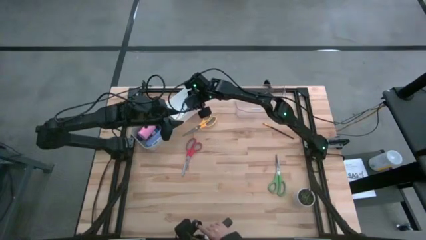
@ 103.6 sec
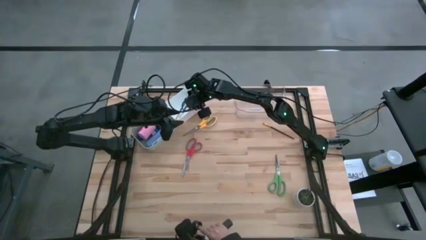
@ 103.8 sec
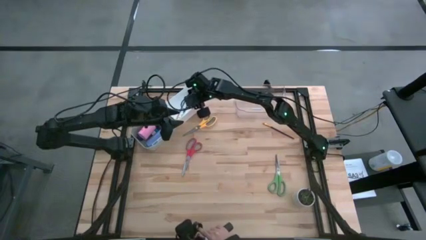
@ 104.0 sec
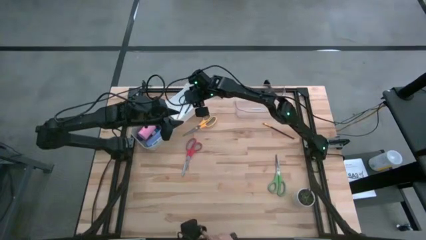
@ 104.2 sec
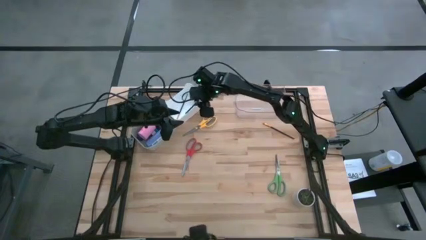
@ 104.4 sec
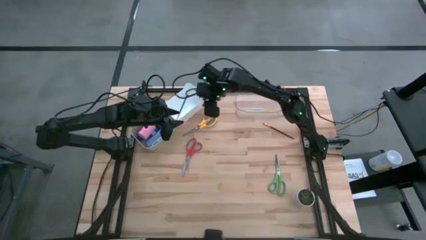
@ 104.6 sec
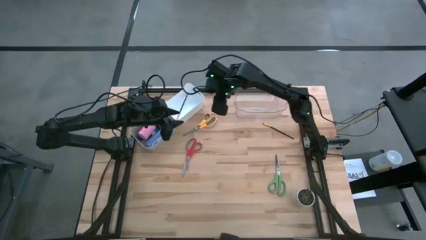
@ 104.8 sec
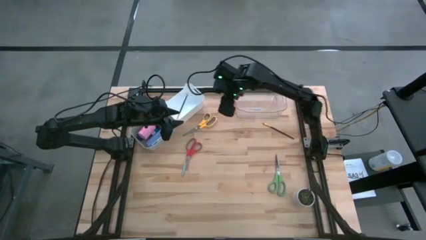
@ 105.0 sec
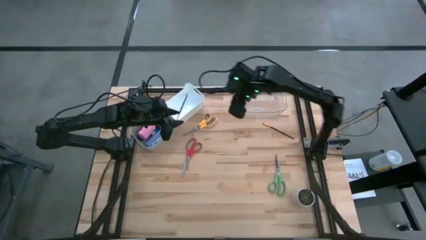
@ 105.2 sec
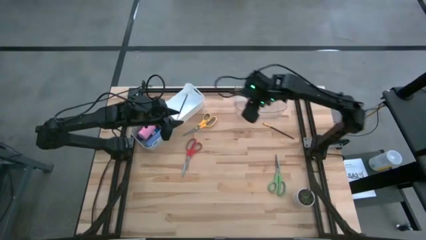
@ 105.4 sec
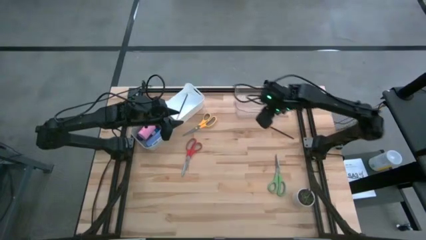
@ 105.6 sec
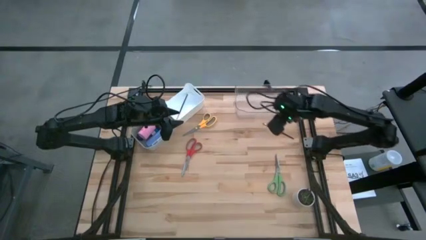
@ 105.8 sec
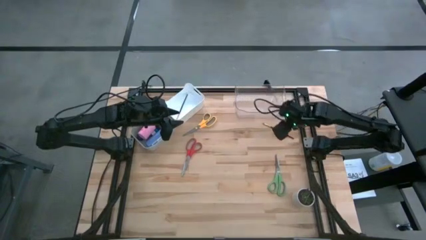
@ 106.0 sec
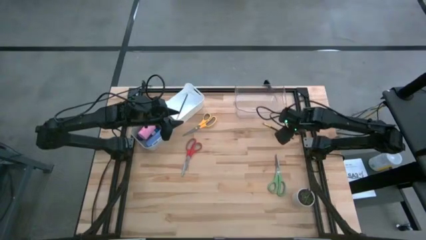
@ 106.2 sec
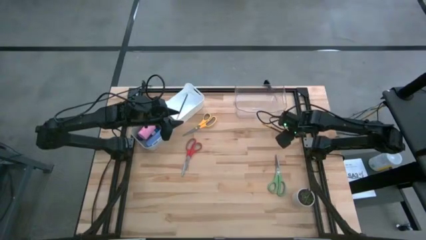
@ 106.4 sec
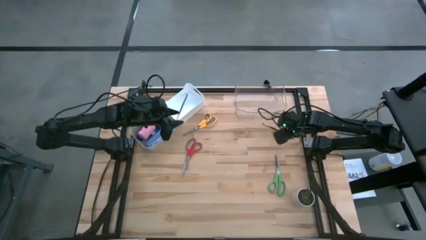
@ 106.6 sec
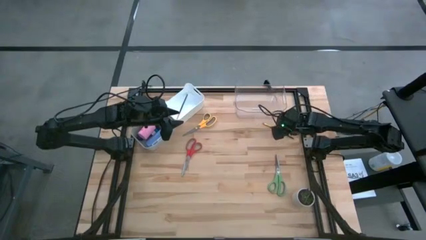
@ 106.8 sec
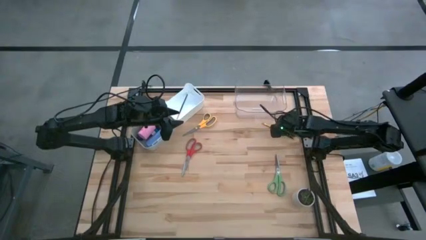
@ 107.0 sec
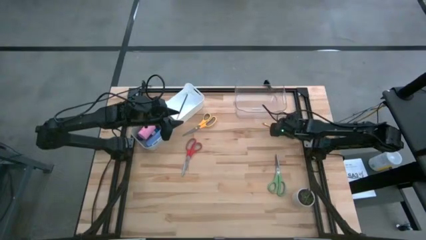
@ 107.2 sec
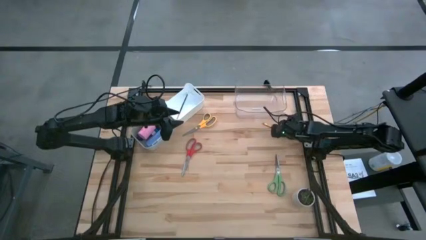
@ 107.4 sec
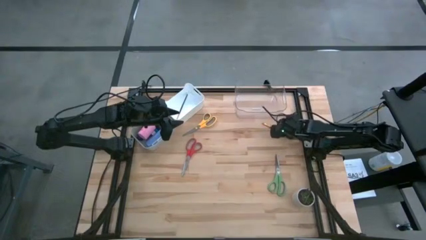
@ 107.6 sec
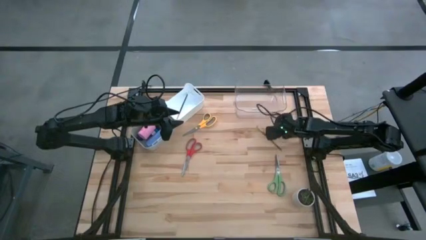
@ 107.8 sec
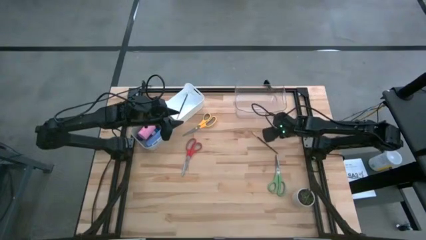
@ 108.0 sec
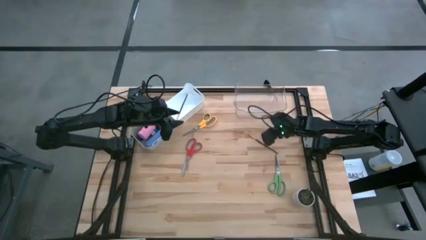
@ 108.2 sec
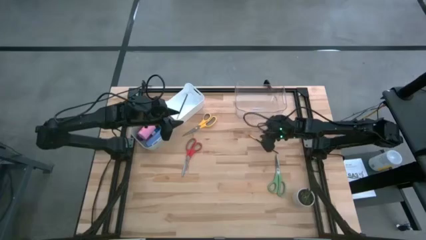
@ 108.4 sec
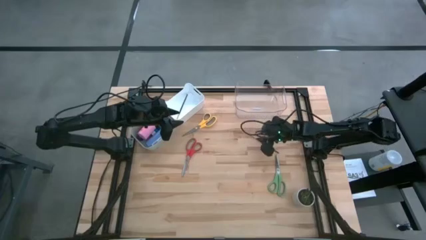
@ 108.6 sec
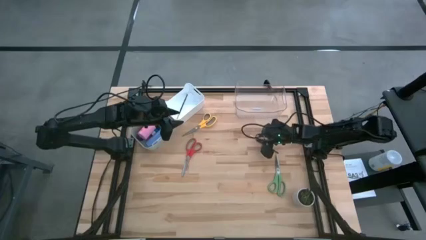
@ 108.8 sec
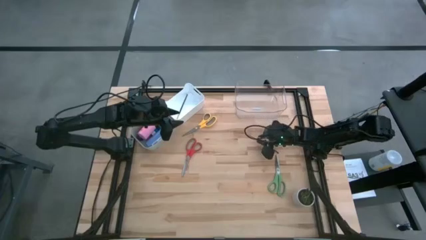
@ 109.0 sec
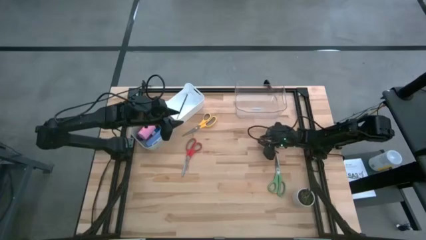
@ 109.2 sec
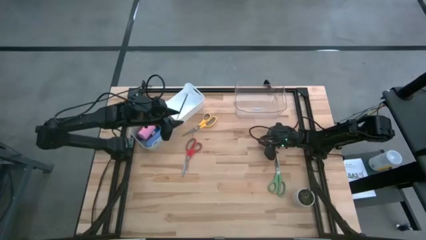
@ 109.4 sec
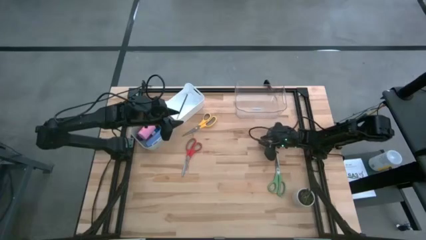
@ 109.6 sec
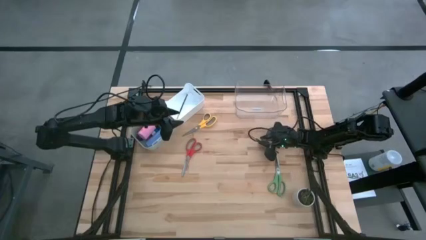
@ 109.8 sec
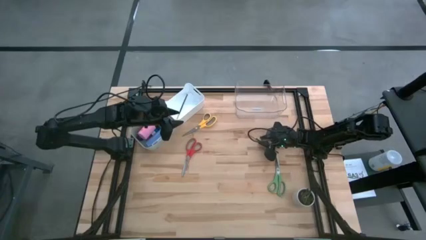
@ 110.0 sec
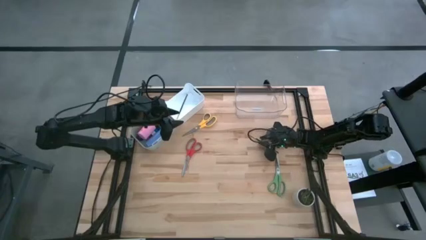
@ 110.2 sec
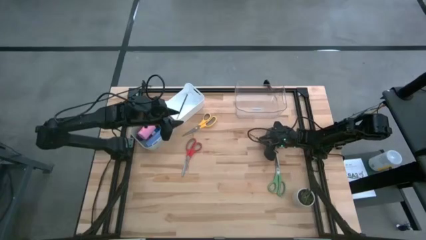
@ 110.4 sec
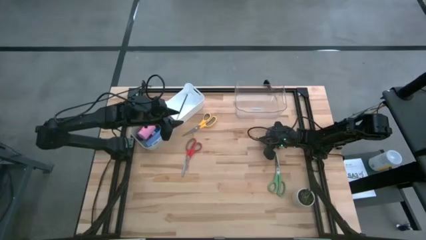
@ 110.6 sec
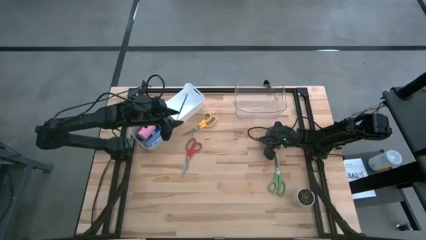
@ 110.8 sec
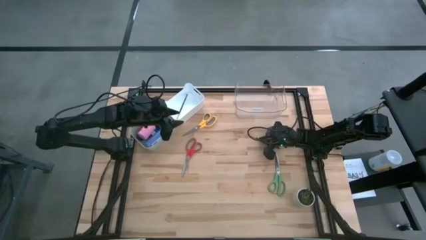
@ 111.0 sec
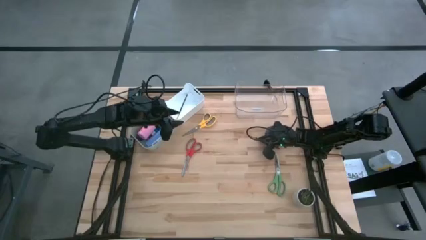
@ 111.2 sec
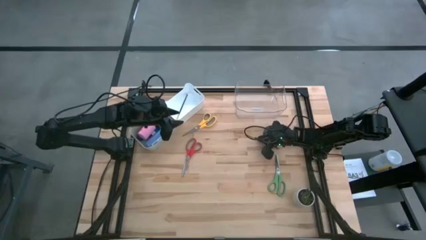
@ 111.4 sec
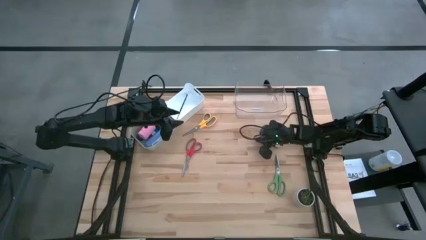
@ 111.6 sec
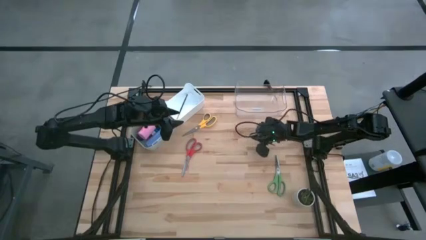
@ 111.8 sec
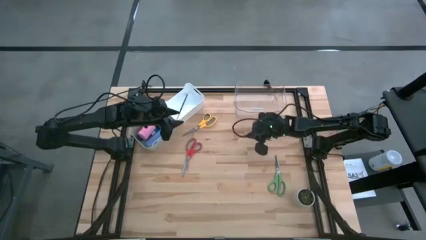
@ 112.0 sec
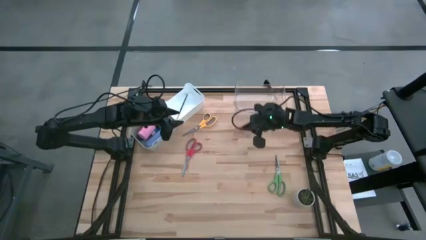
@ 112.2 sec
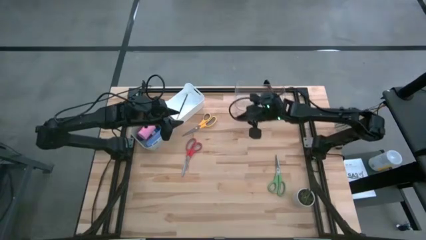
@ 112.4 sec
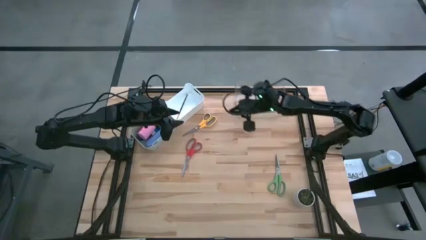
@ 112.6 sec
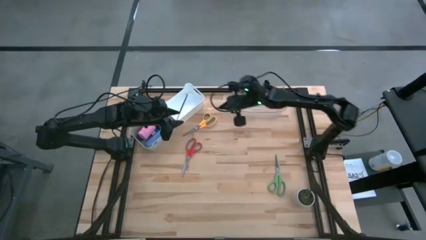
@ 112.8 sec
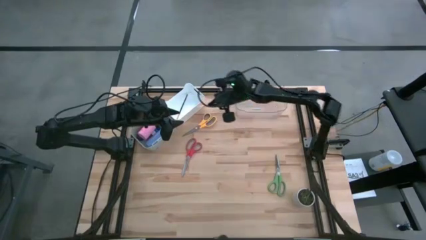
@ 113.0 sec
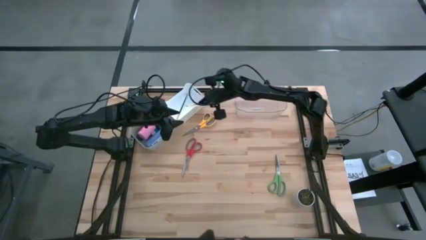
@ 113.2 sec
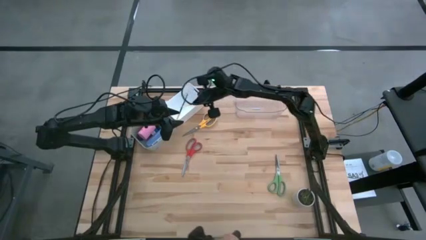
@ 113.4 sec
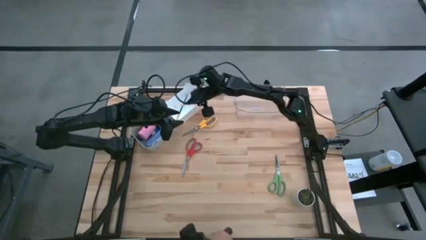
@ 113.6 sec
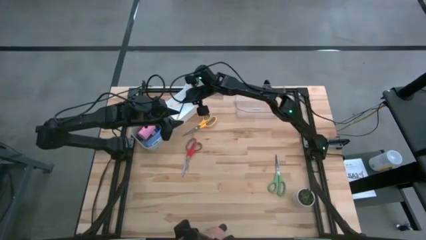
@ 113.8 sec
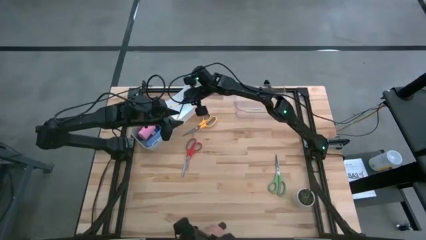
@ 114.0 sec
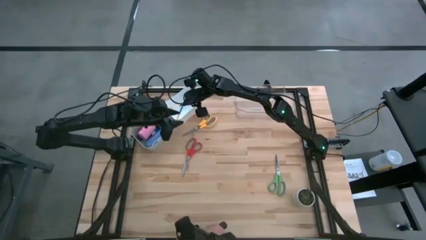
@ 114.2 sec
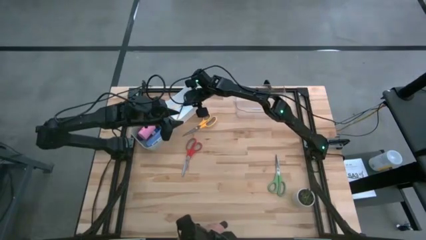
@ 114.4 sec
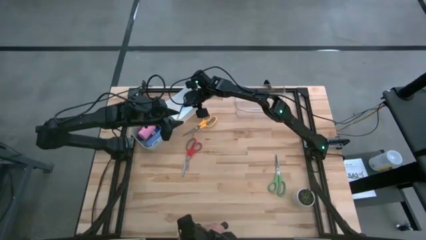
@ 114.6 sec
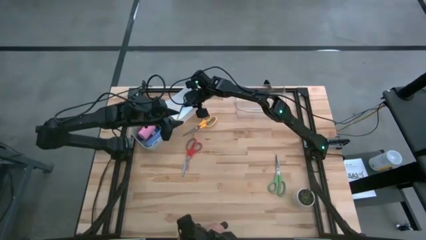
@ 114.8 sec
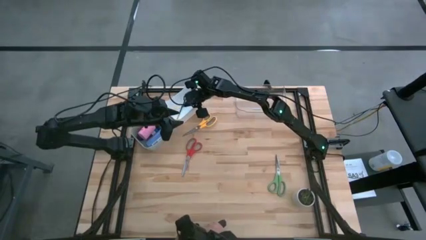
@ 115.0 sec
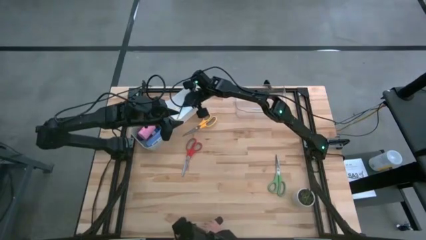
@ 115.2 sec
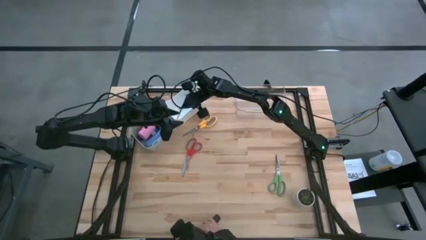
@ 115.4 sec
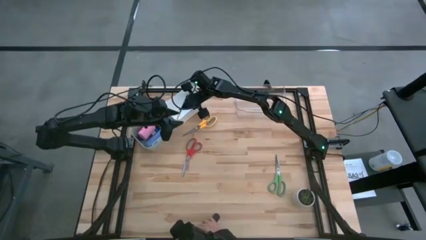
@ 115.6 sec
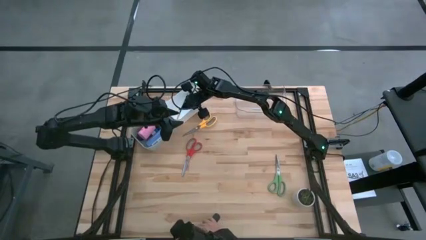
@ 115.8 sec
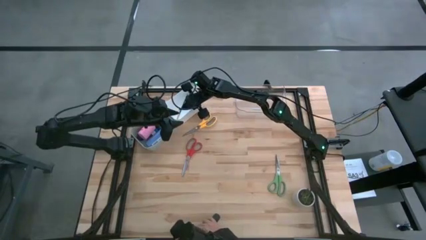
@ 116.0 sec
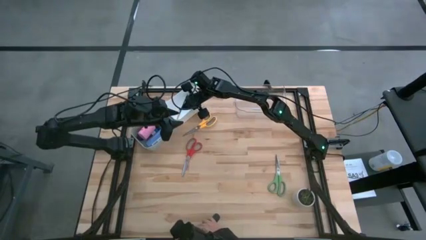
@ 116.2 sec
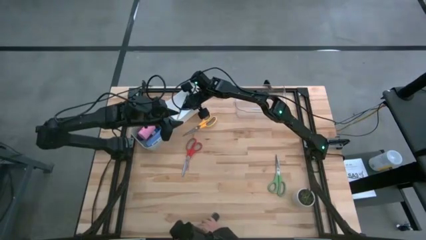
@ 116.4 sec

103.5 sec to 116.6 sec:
Task: Pick & Place Paint Supplies
Put the gold paint brush into the white bin

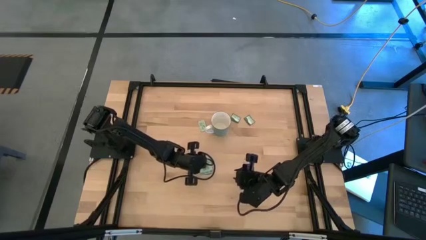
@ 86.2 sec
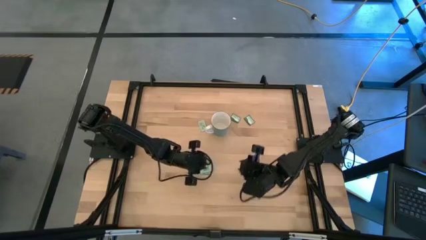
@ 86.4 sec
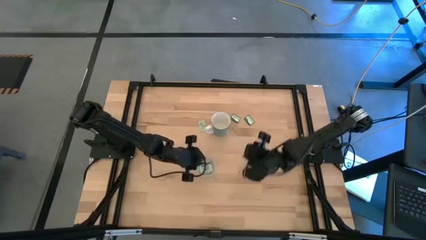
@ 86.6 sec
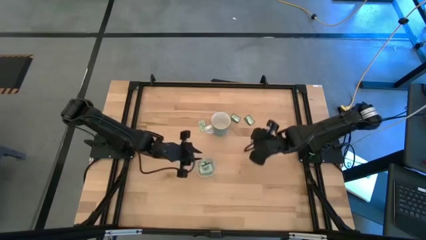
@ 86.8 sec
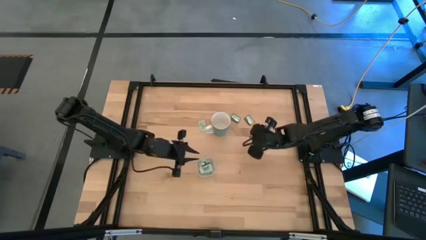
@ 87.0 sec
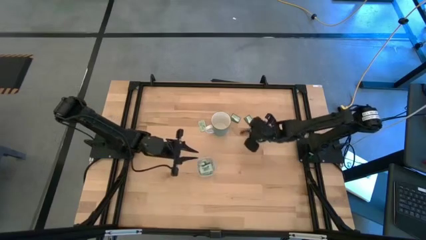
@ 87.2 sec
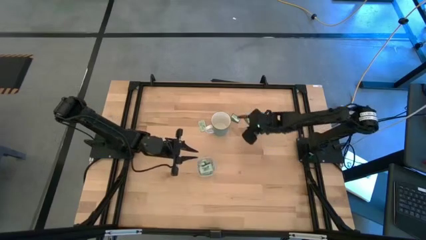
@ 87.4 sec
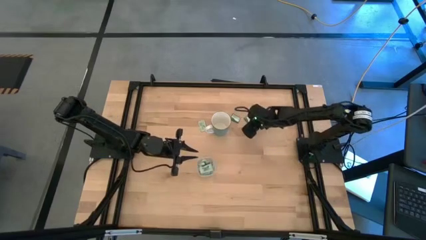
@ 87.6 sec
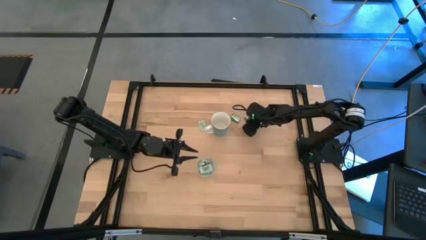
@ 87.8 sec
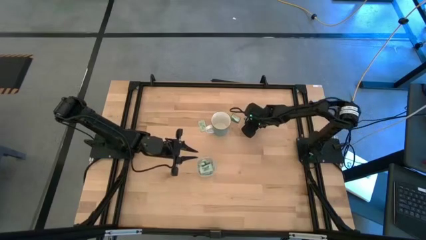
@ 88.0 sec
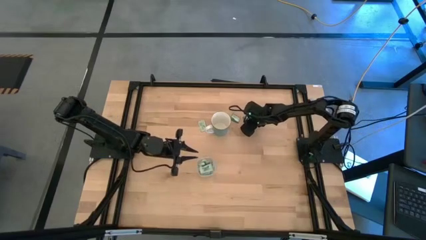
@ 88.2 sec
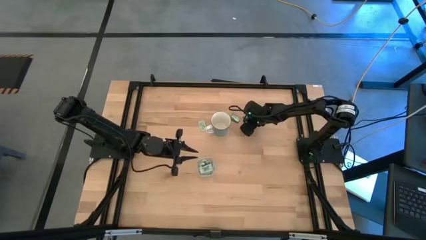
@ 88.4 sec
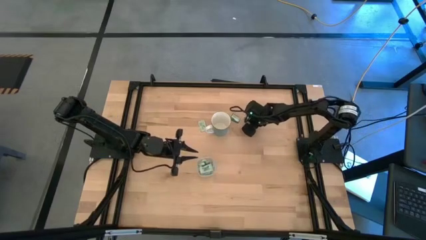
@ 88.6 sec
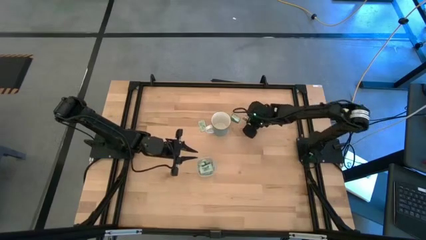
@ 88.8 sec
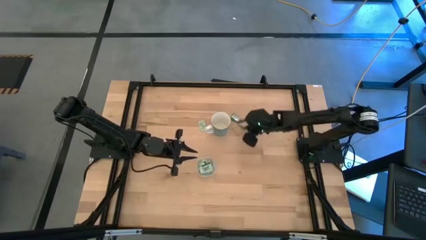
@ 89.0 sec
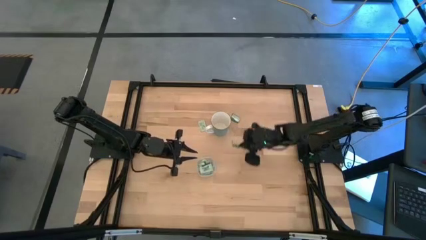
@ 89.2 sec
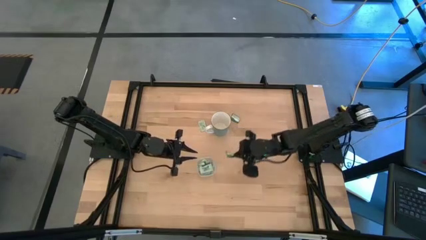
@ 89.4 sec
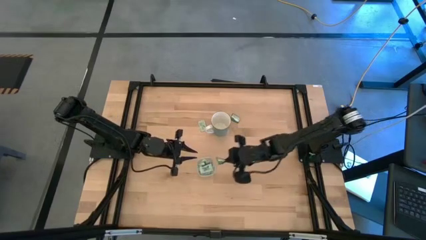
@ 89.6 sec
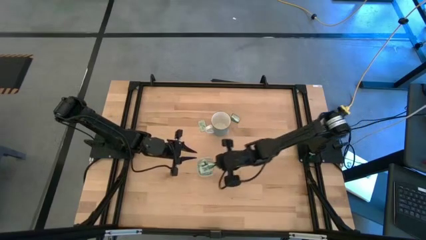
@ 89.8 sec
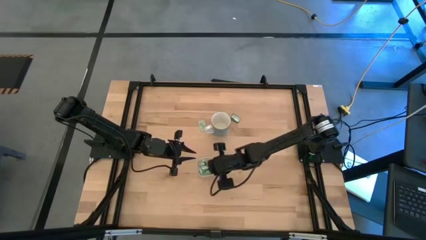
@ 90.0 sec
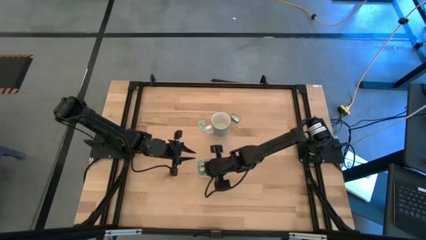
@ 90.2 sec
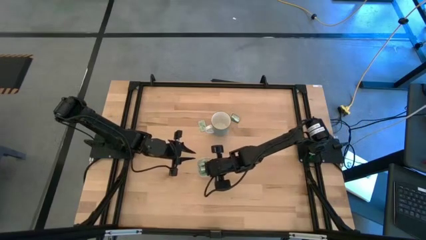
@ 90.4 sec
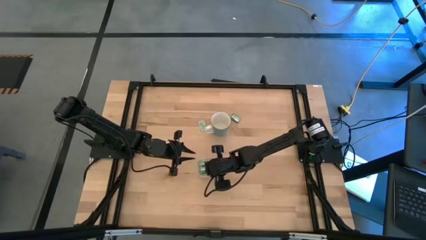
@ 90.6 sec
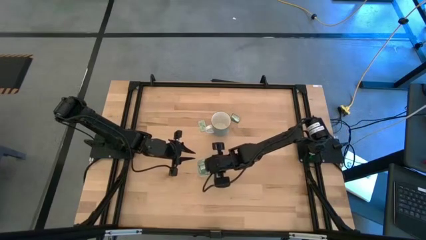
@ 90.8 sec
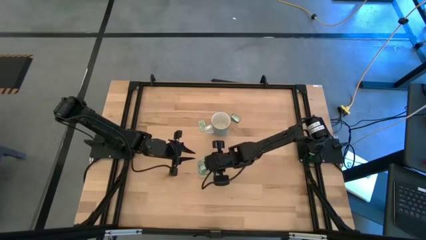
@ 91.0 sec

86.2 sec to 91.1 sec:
Task: Pick and place Stevia / Truvia into bins
Put the green stevia packet into the transparent bin
